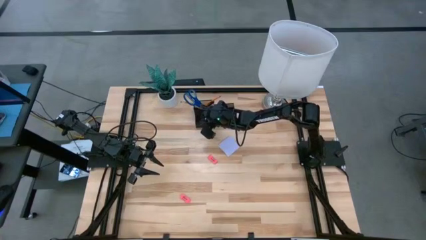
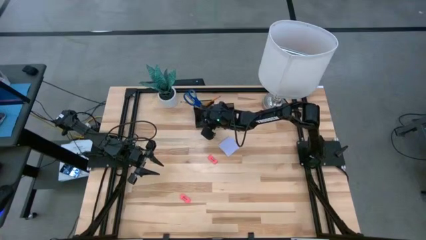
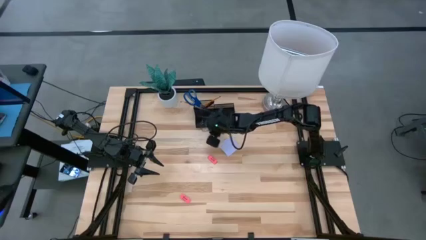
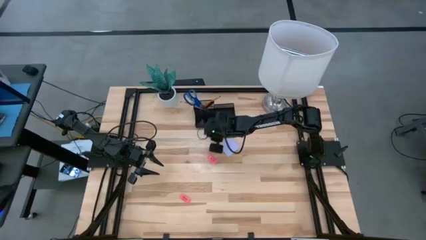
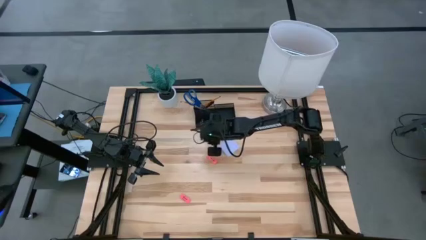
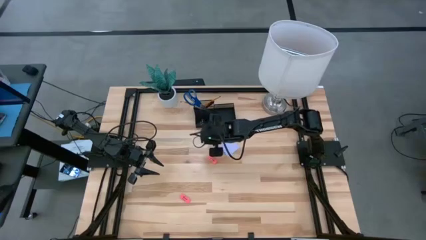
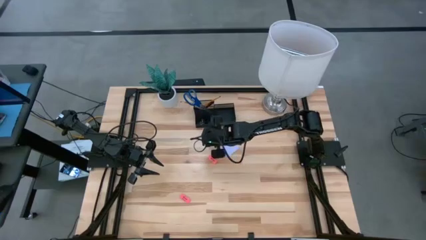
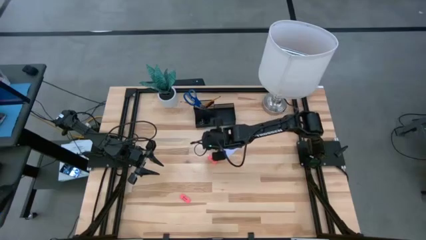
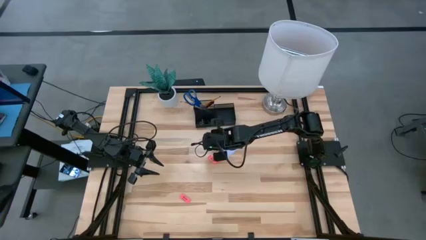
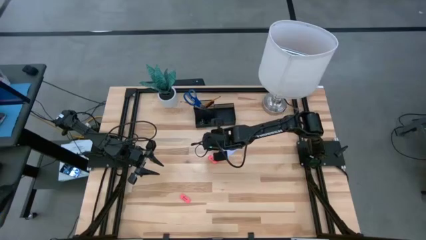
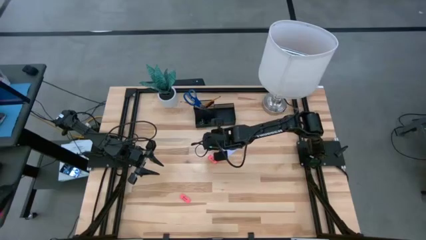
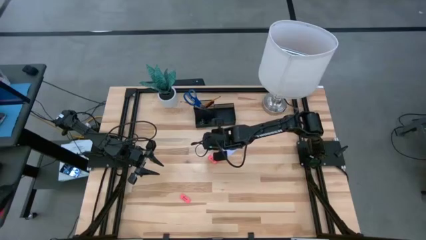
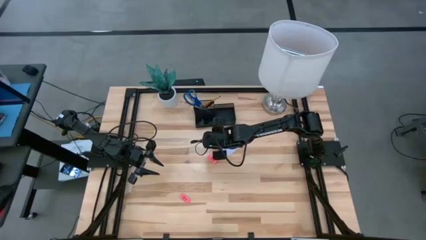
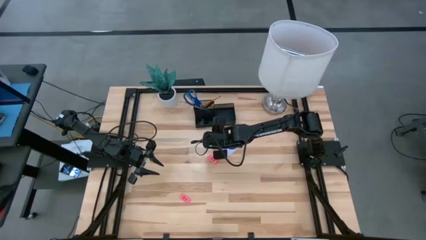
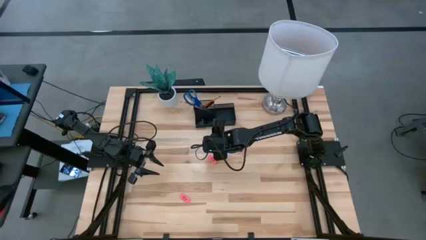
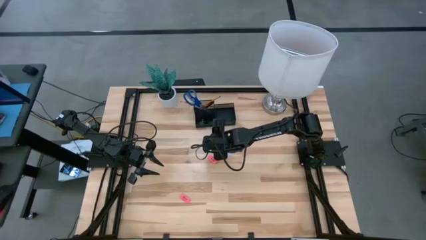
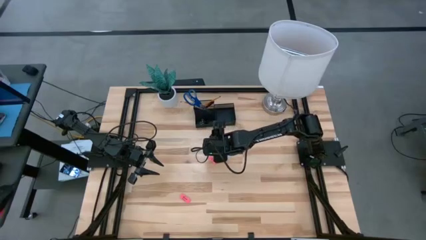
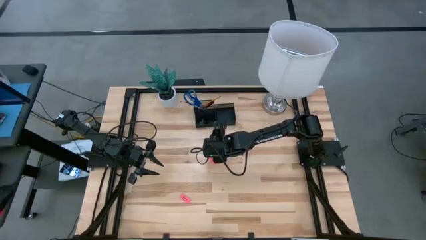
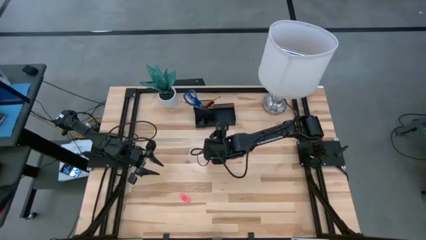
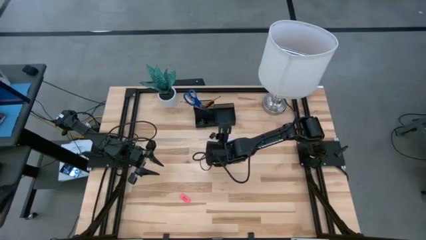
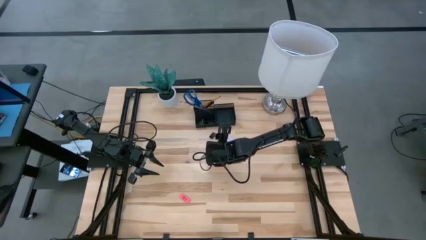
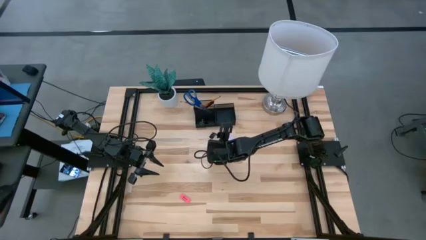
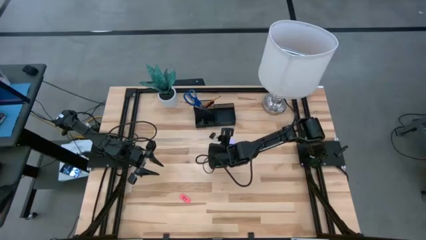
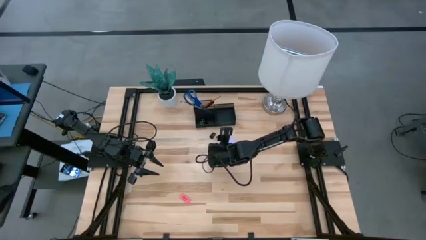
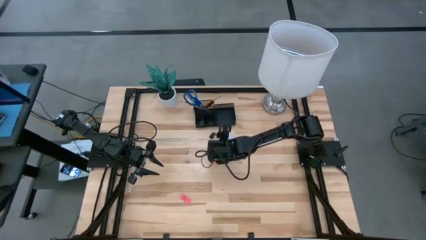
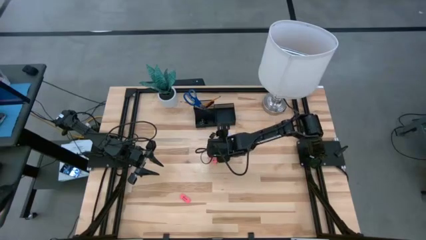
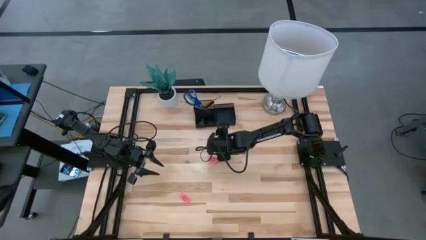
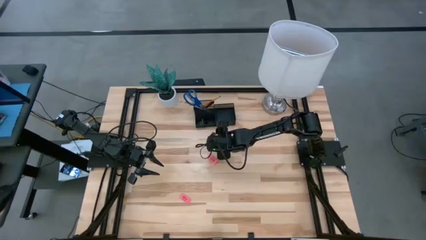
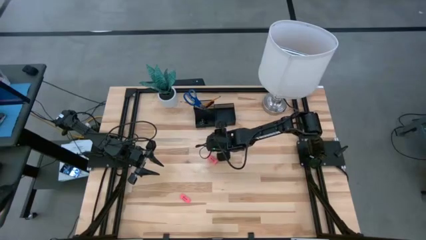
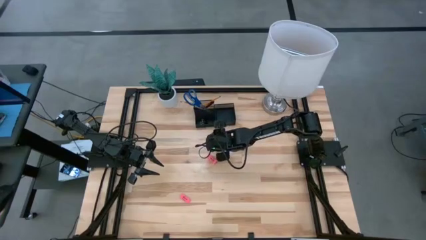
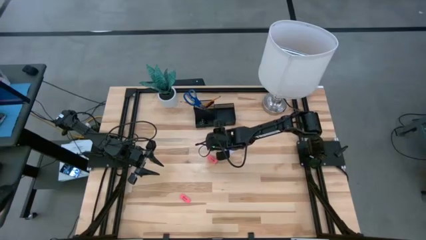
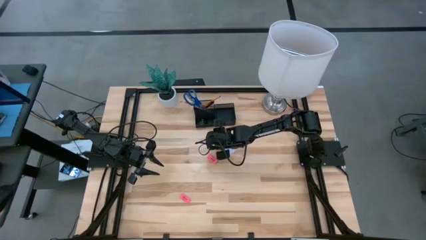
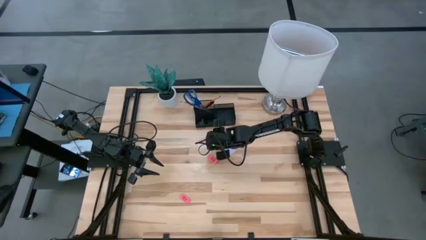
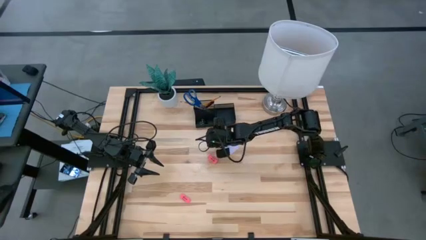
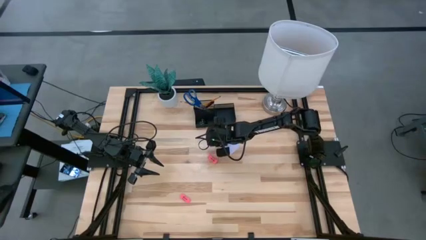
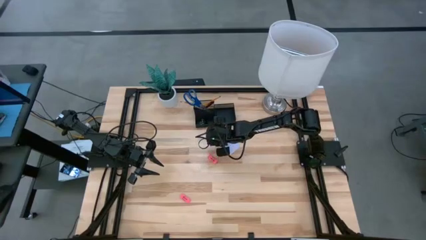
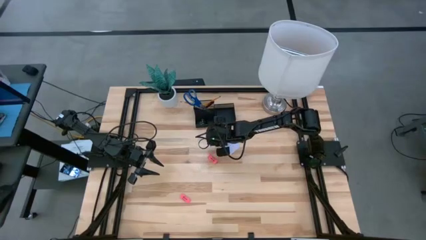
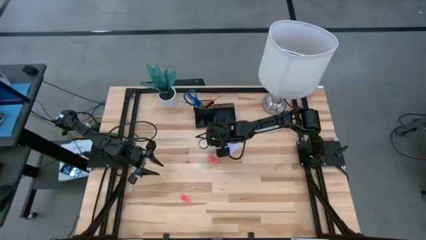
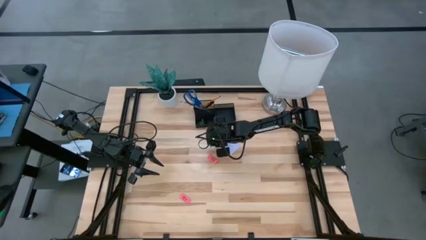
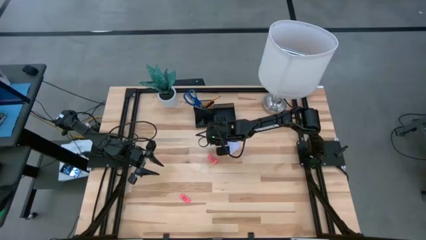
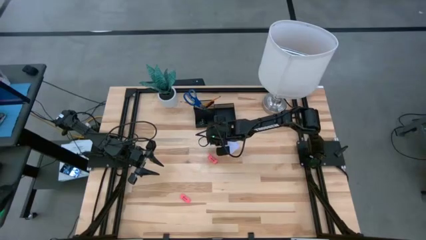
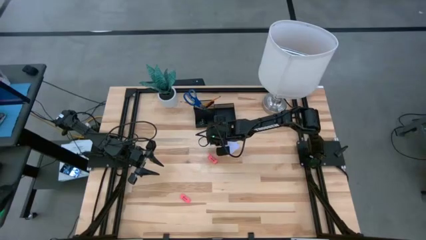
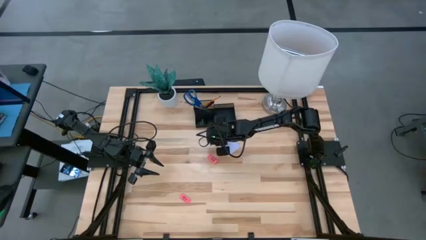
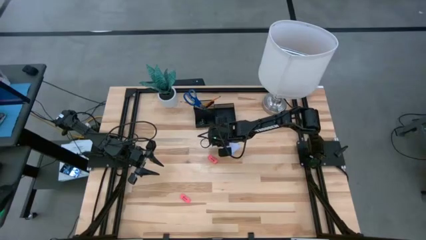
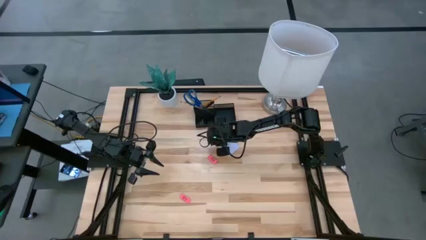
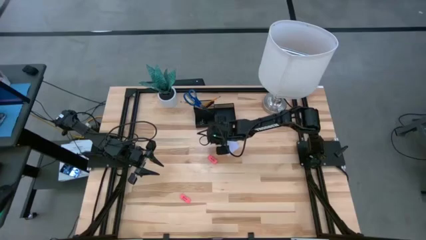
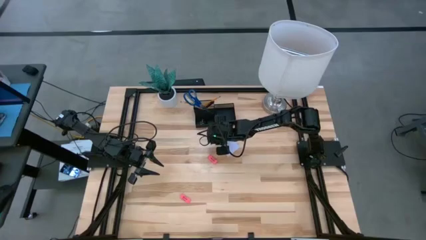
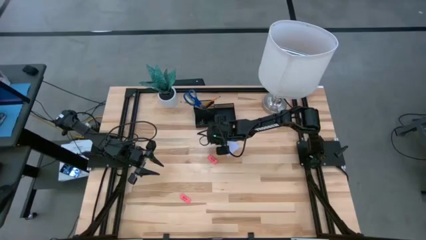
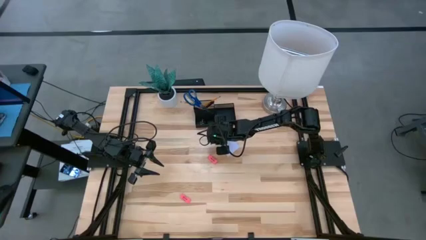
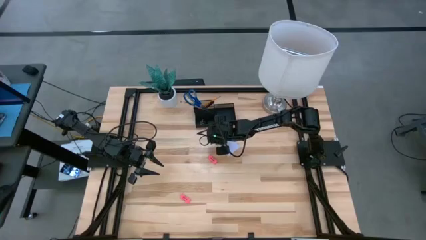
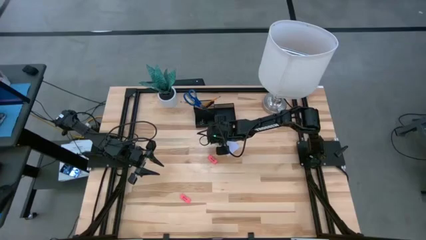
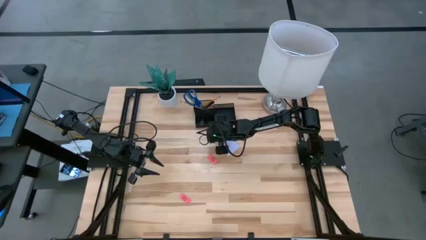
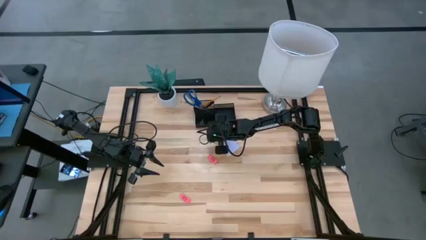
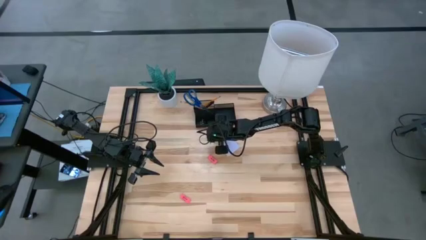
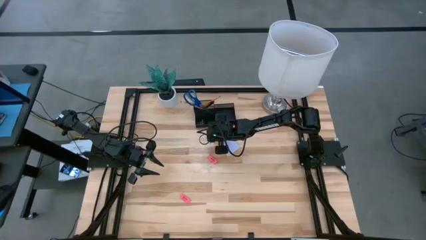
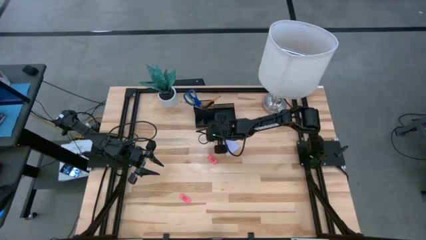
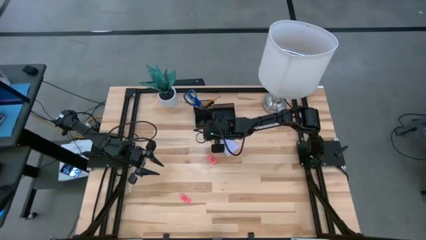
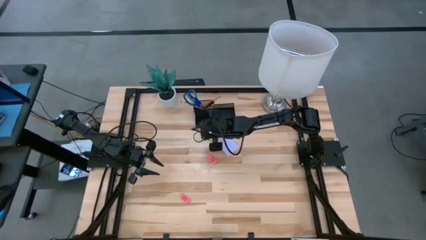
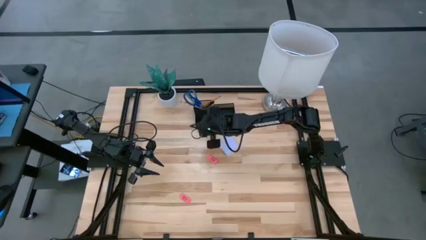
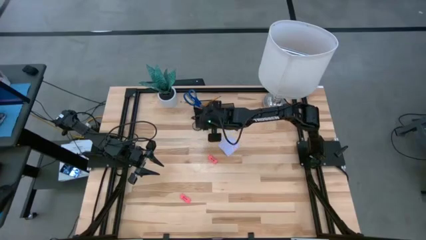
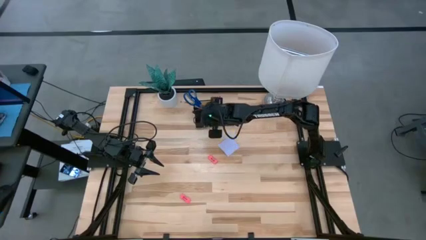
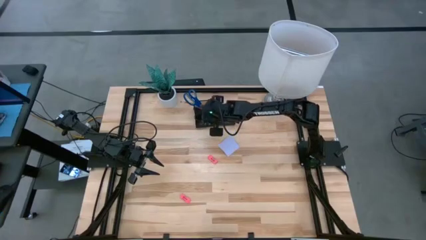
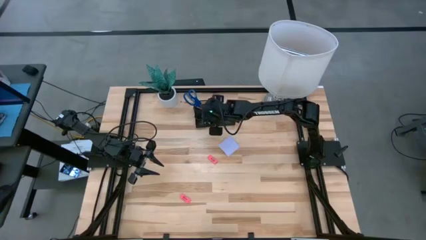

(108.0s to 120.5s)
Task: Pick and place office supplies into organizer
Put the black binder clip into the black desk organizer
